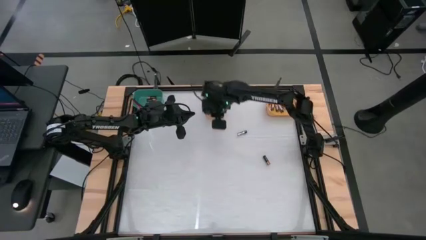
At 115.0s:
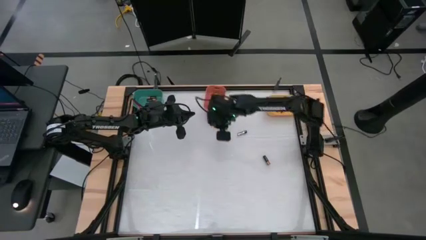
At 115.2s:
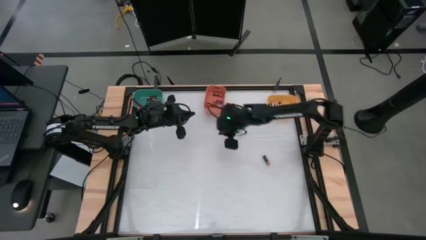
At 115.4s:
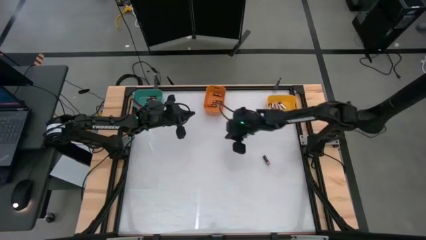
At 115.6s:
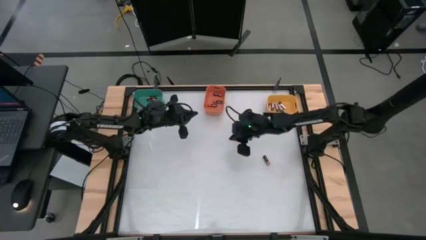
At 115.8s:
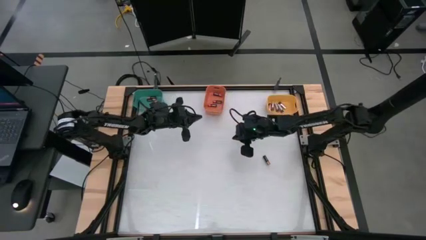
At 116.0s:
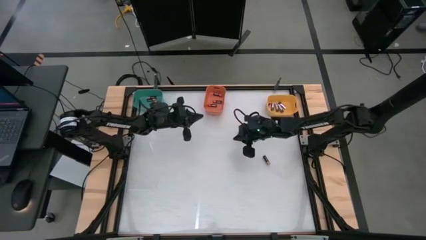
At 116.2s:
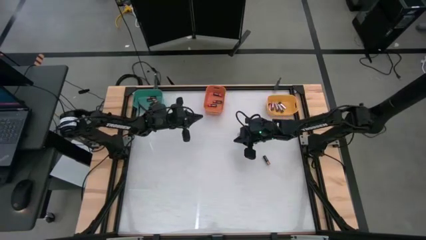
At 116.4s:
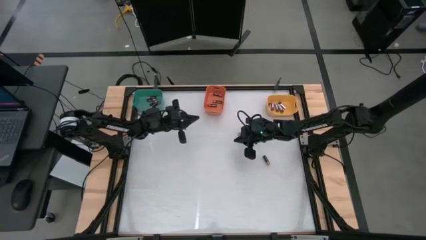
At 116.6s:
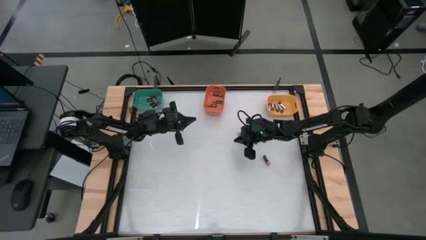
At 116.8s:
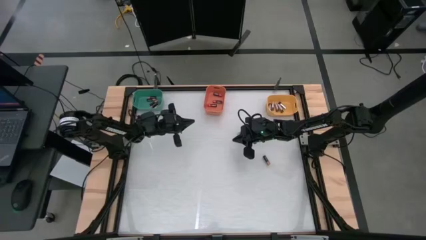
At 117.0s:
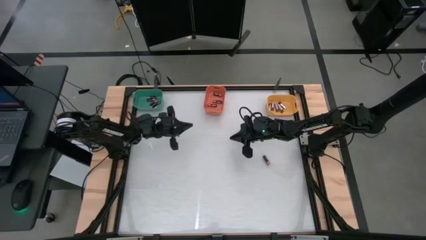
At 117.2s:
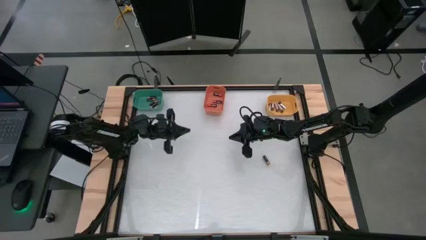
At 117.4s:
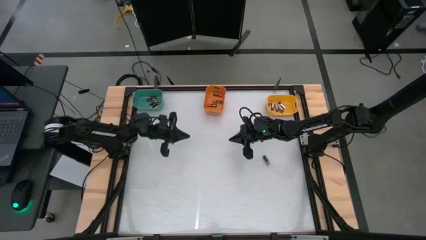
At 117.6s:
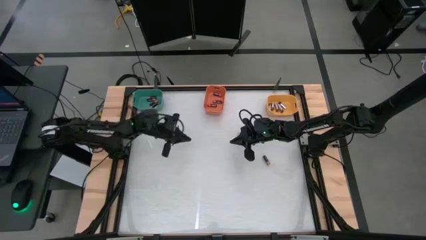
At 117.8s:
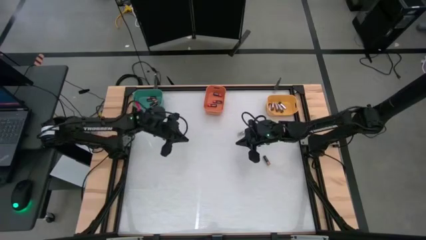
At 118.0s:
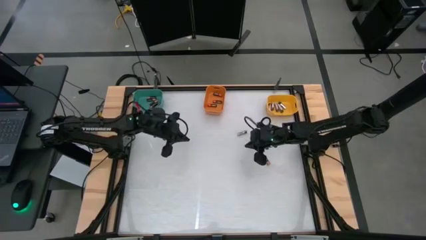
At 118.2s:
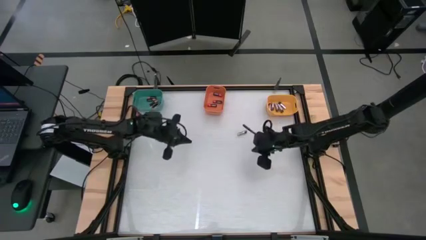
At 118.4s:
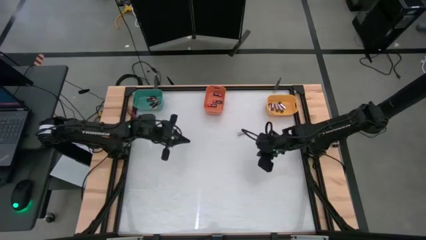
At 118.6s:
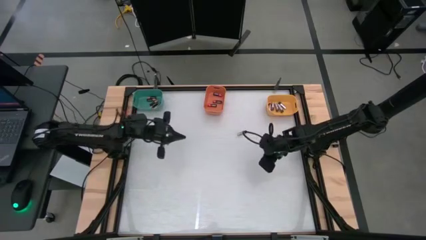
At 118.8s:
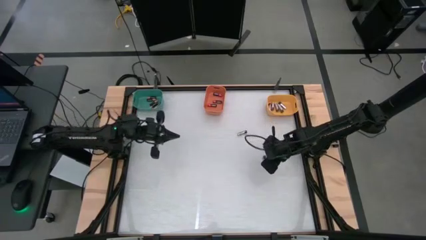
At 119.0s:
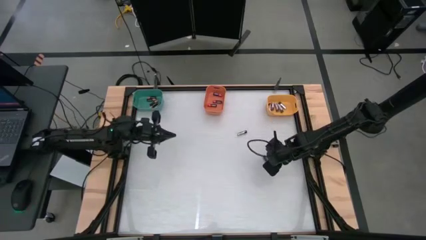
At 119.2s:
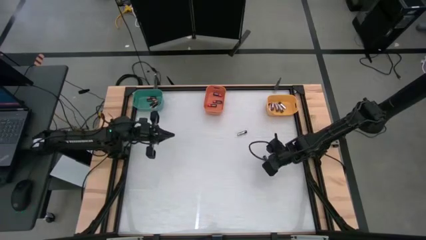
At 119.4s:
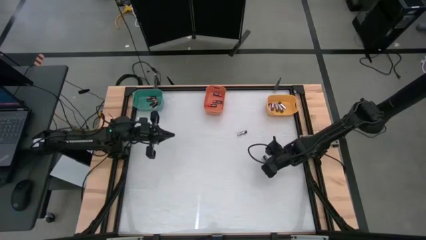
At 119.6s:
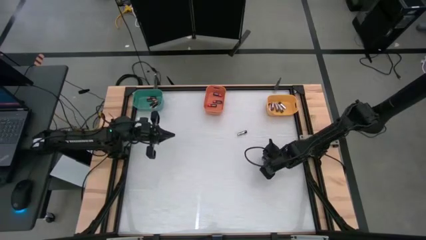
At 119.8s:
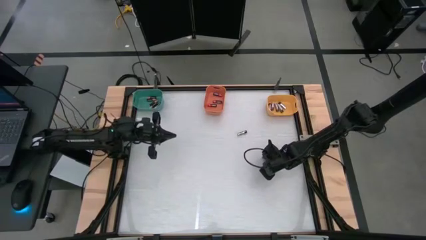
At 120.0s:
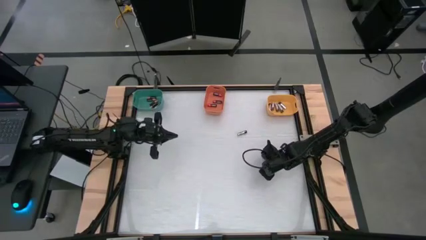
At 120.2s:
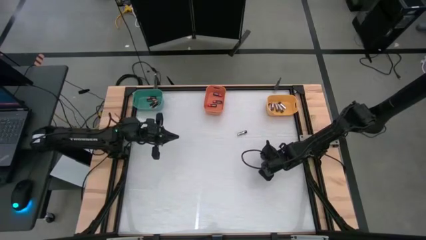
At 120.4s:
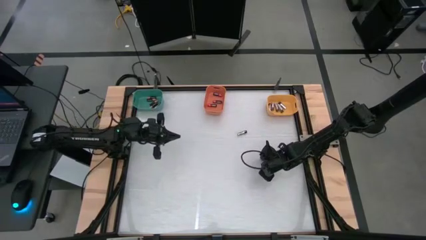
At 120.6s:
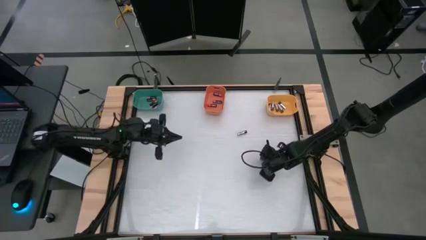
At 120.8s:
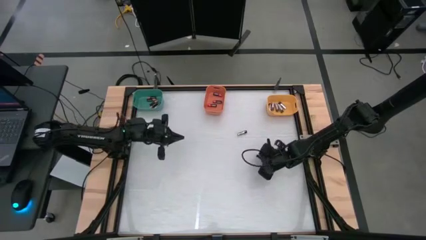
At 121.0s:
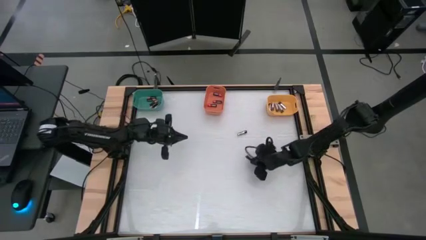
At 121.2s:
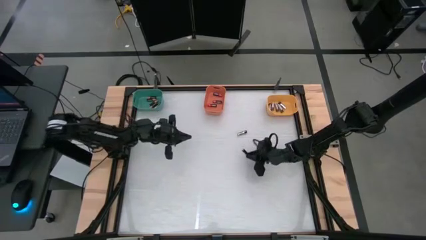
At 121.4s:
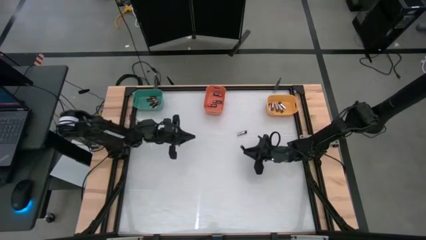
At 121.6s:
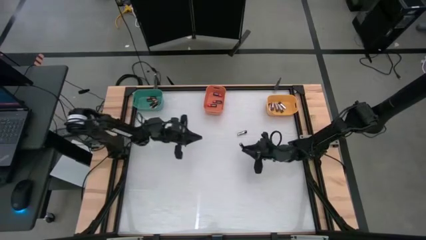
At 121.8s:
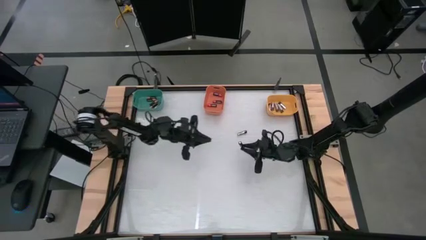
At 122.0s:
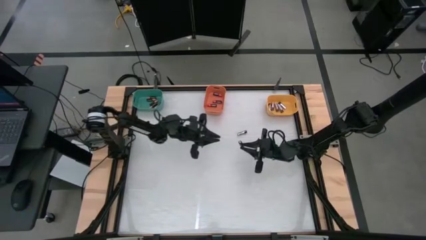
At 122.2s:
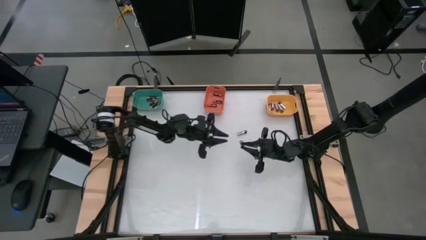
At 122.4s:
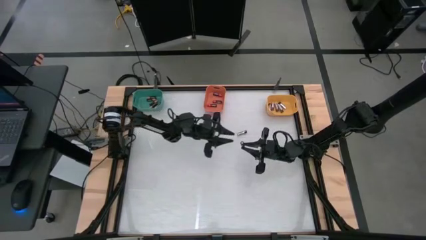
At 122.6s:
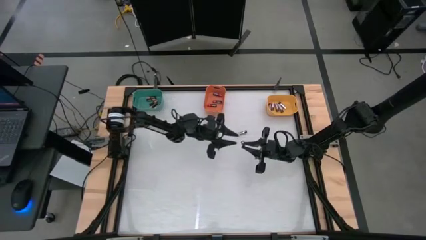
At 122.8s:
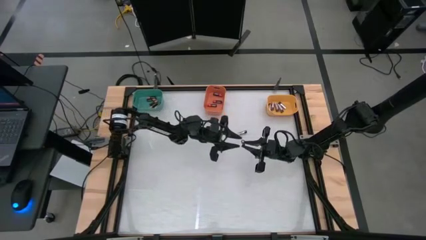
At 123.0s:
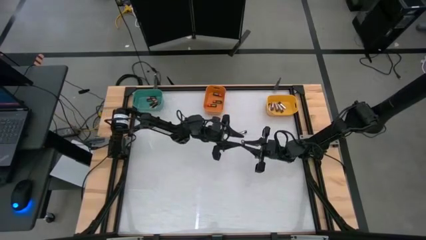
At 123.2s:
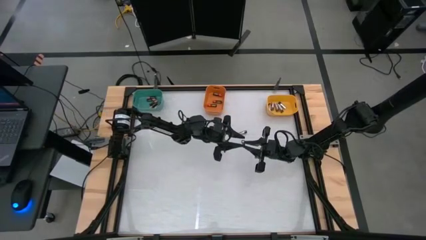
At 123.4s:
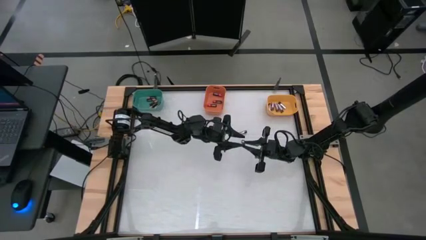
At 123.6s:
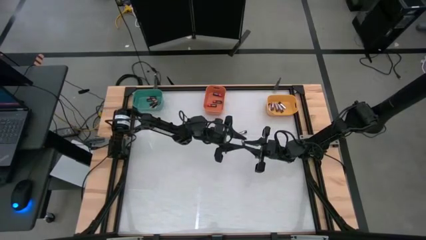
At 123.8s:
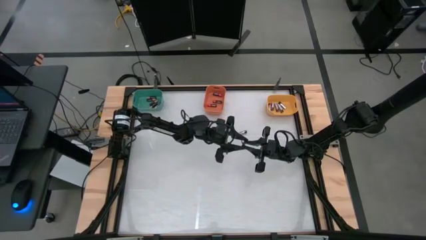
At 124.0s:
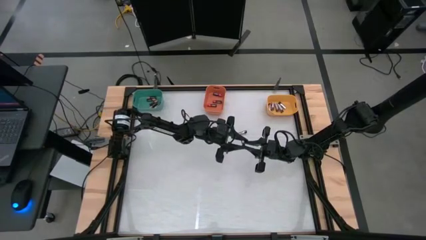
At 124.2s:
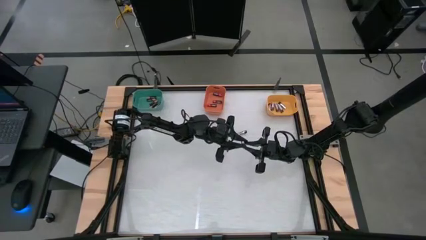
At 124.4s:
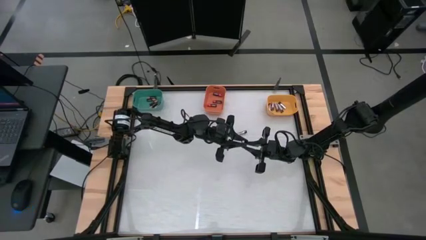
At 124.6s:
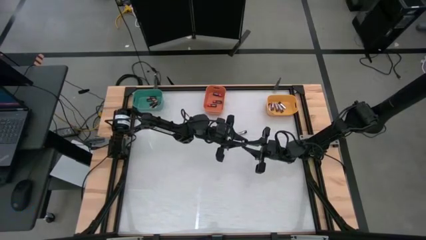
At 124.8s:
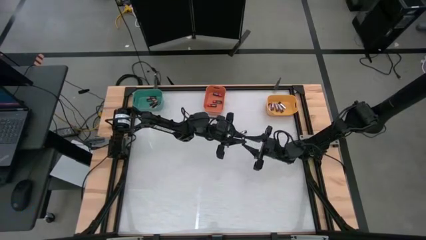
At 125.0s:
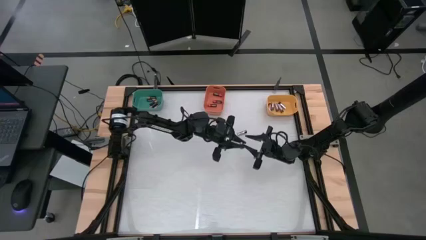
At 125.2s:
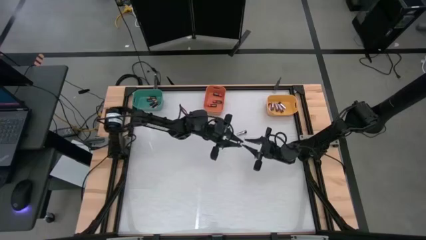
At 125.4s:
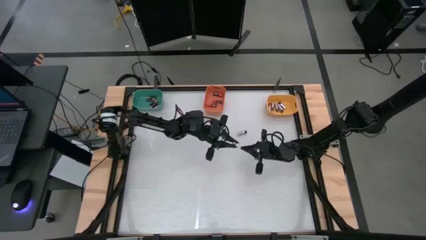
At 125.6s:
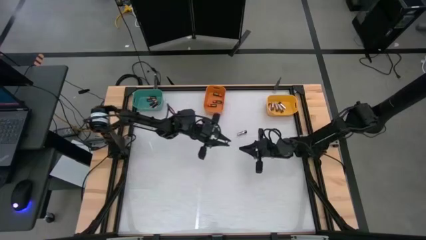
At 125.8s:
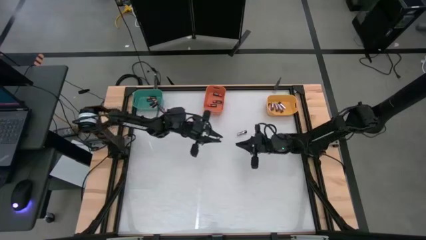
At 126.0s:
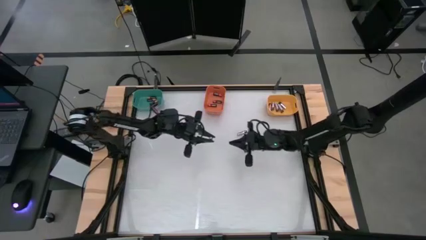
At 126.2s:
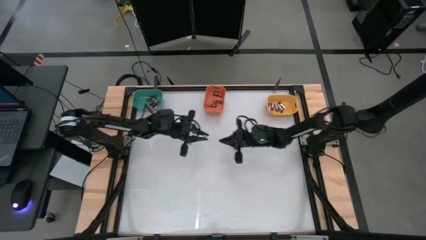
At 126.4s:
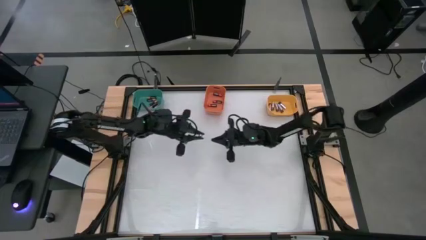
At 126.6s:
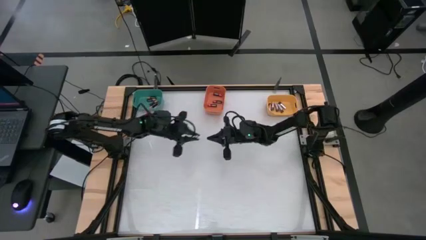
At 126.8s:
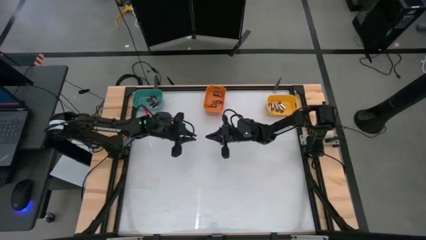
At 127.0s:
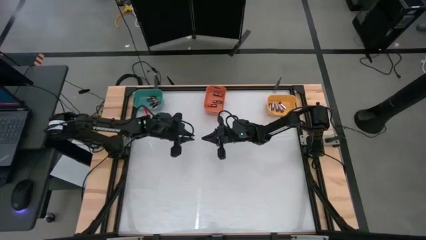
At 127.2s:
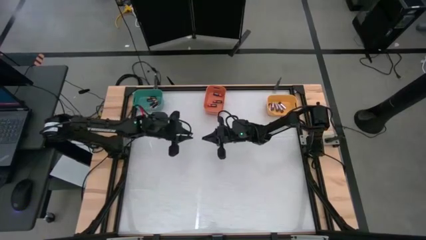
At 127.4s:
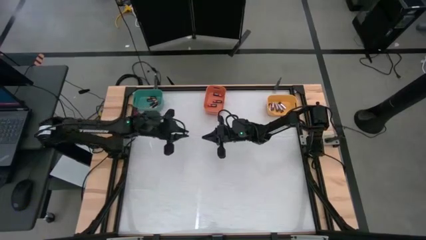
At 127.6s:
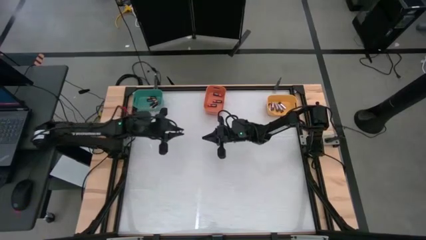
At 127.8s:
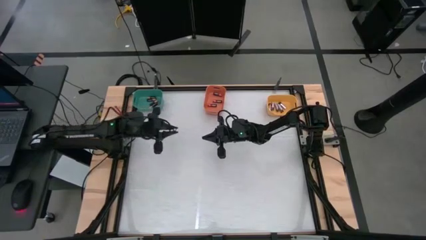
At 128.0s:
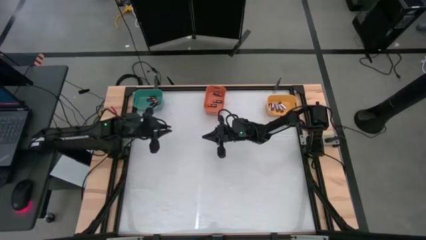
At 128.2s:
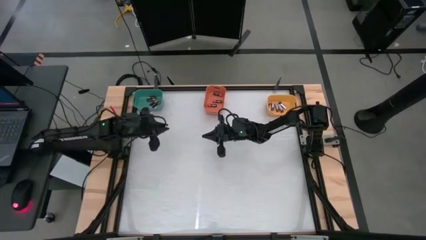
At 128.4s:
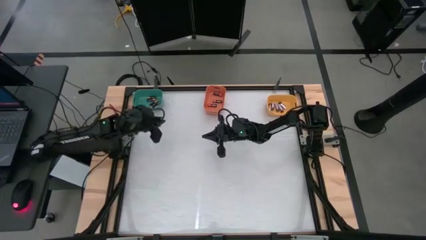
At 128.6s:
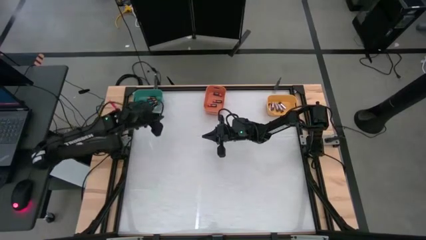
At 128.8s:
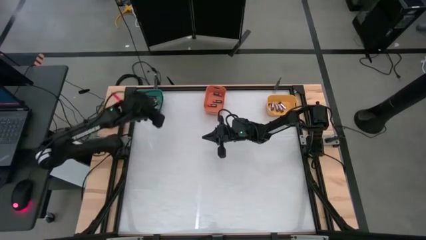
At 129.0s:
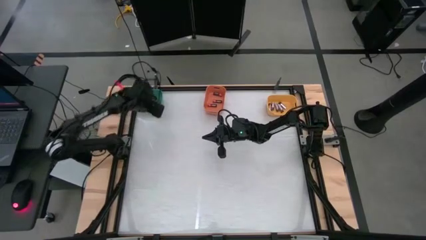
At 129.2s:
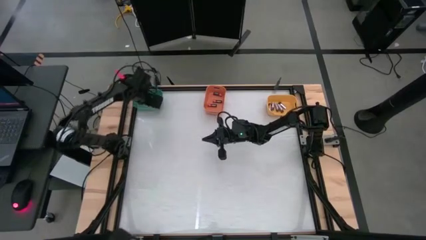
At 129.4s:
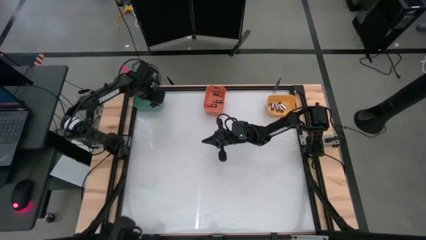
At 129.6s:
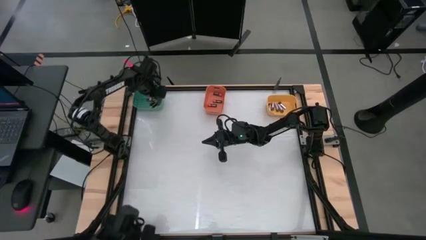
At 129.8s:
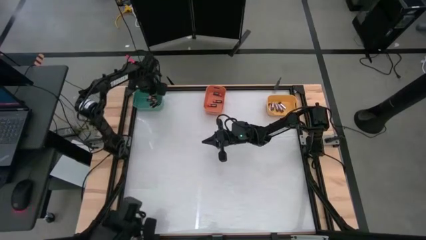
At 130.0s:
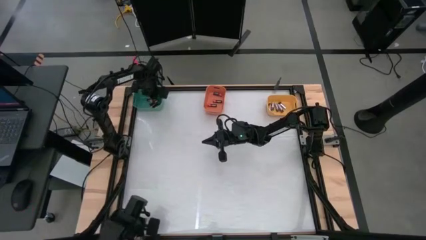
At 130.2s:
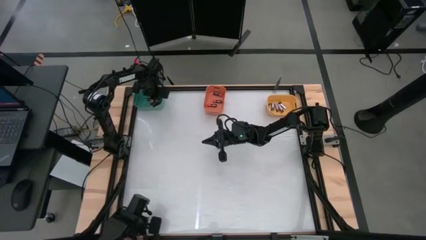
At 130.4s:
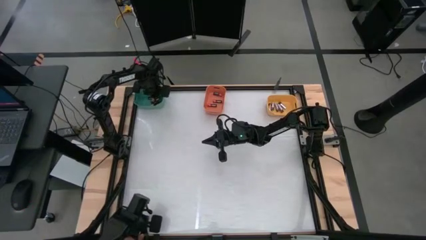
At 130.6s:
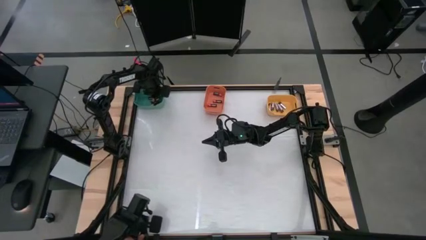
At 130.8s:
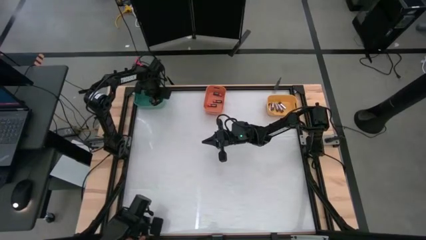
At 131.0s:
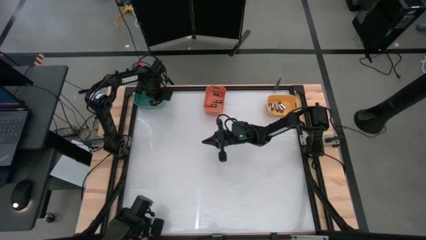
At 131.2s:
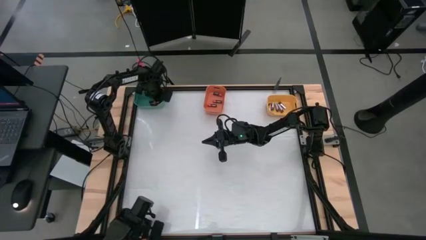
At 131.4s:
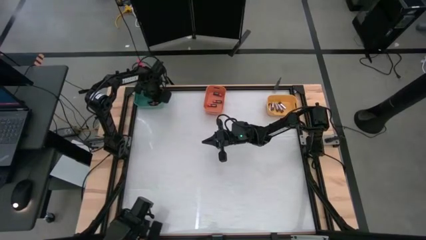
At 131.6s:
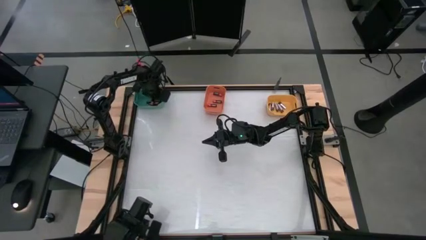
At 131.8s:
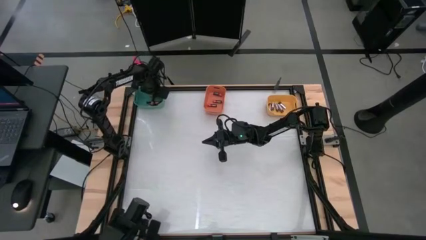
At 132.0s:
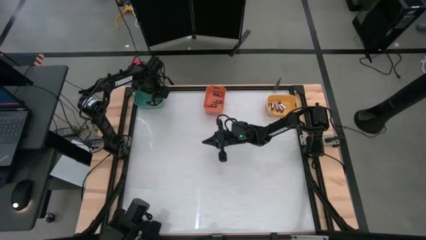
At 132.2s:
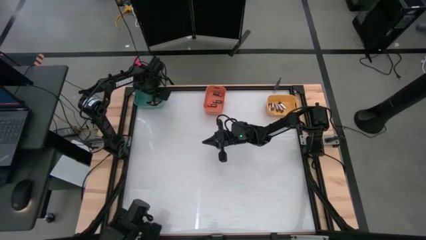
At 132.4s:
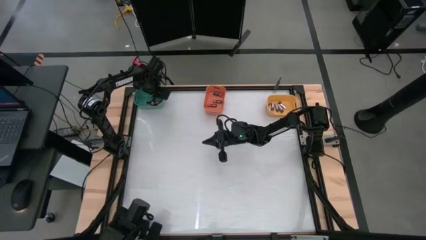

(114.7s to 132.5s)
Task: Sort batteries
Put the copper battery into the green container
